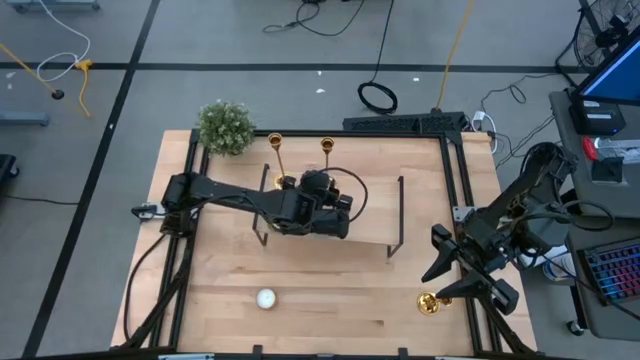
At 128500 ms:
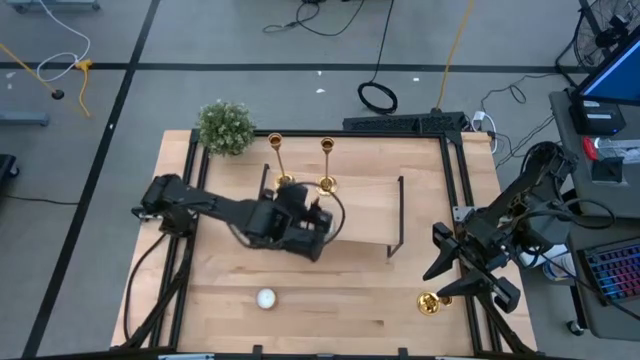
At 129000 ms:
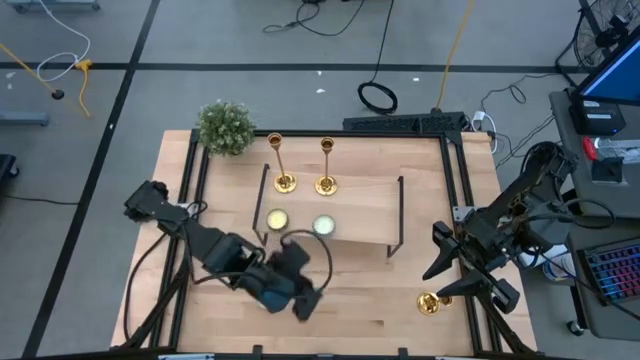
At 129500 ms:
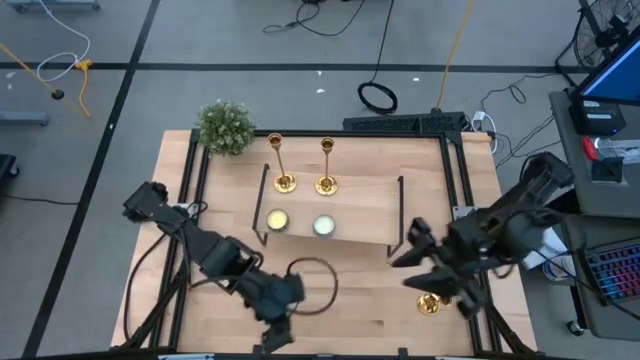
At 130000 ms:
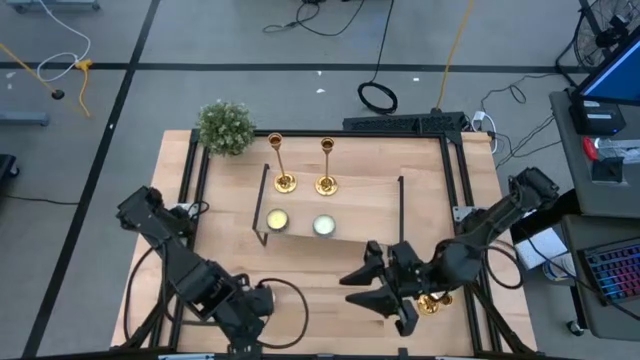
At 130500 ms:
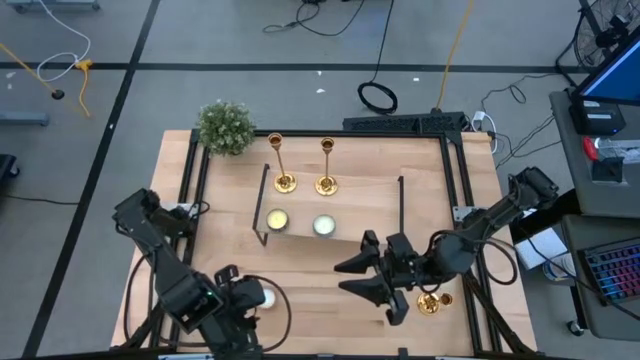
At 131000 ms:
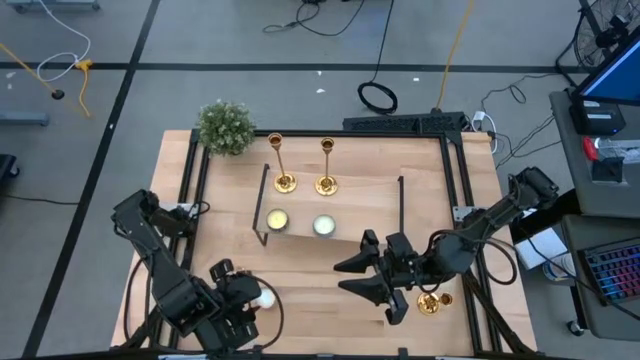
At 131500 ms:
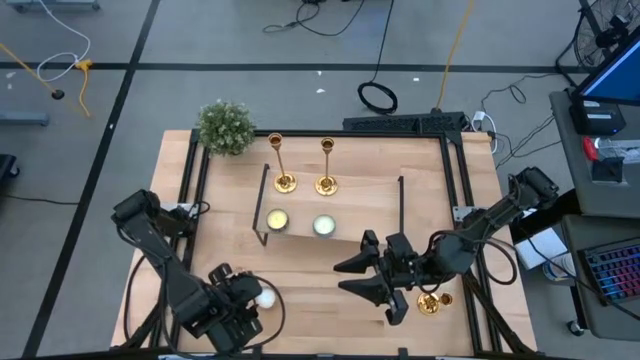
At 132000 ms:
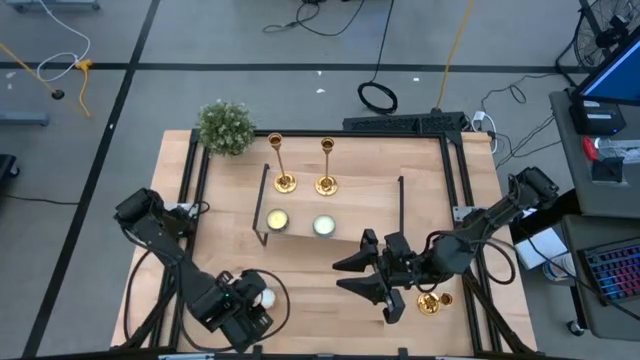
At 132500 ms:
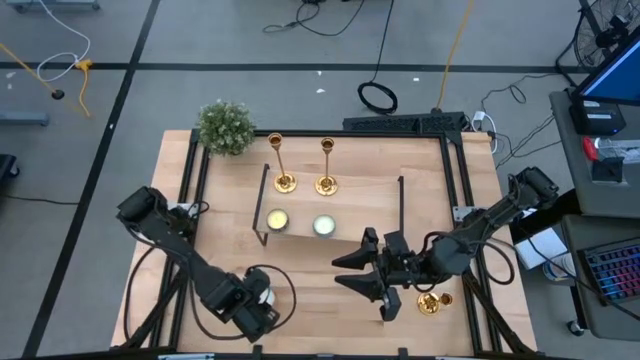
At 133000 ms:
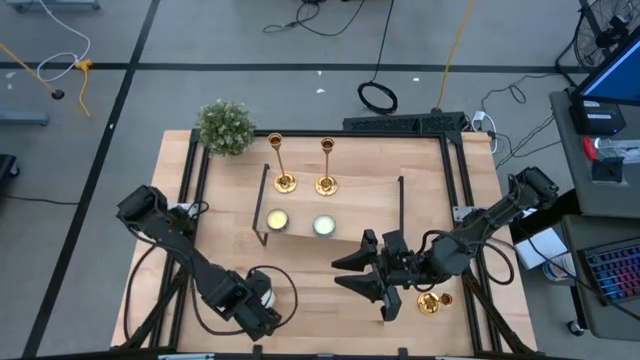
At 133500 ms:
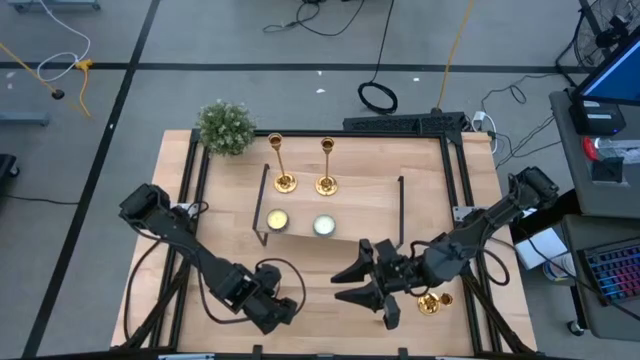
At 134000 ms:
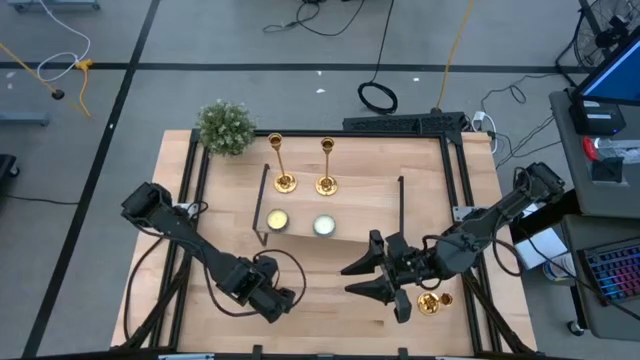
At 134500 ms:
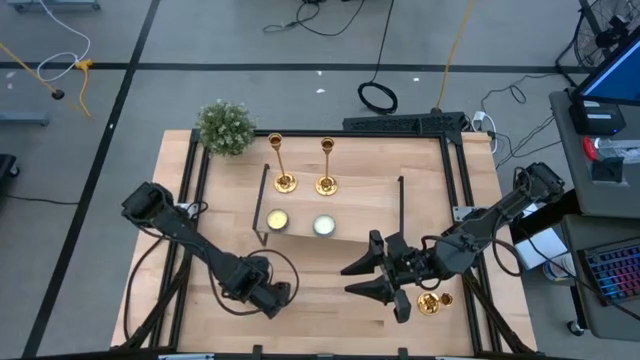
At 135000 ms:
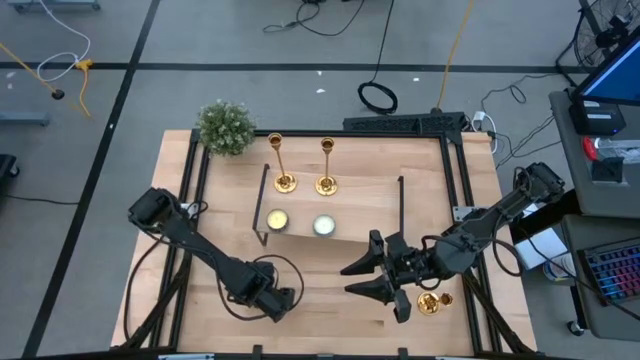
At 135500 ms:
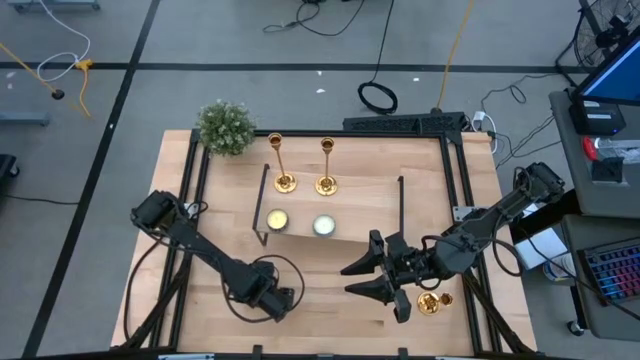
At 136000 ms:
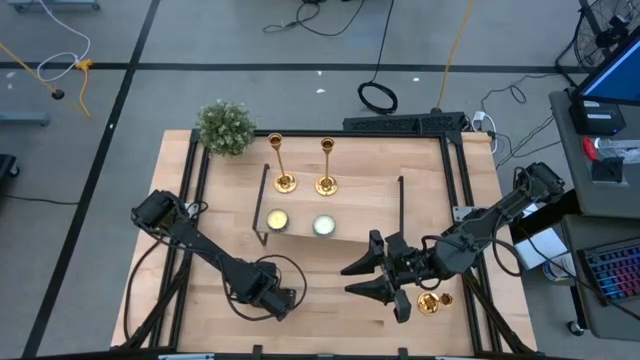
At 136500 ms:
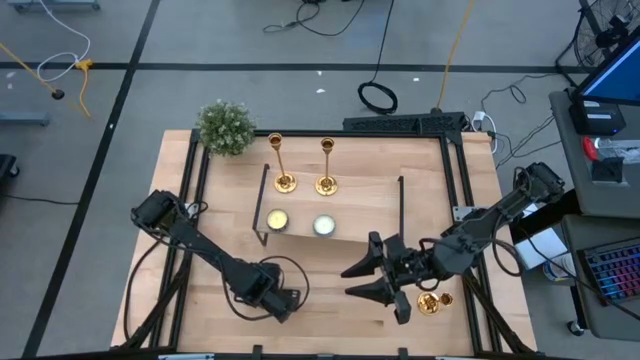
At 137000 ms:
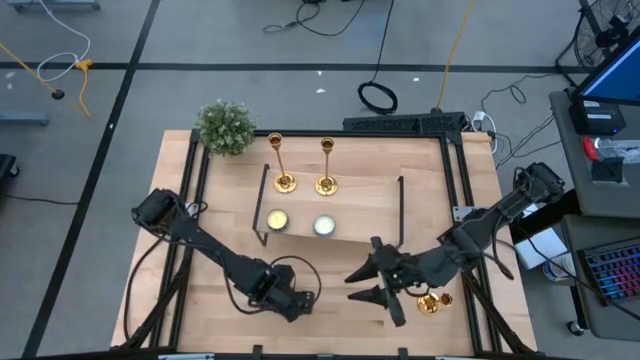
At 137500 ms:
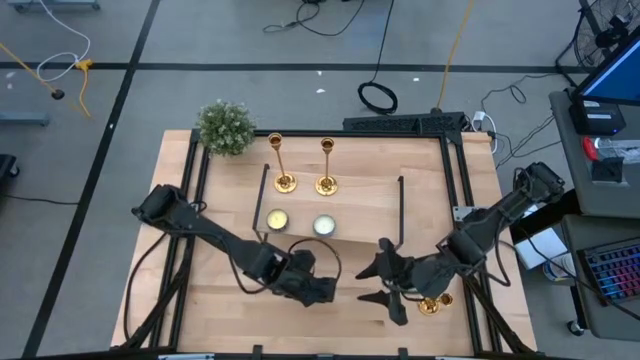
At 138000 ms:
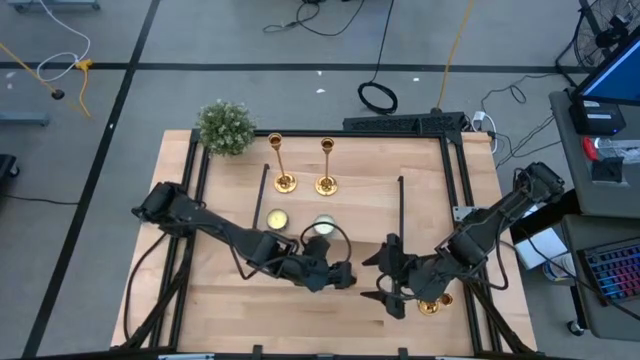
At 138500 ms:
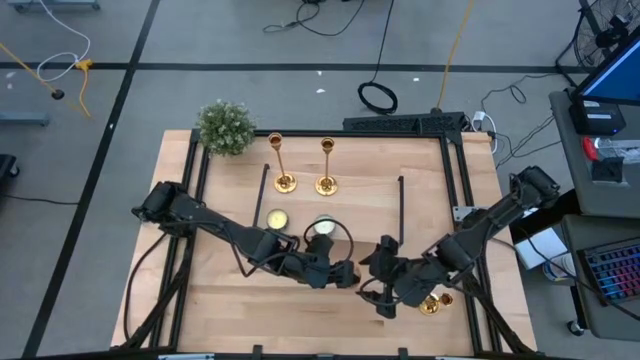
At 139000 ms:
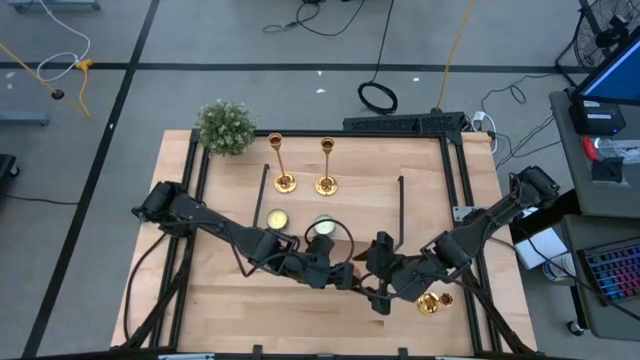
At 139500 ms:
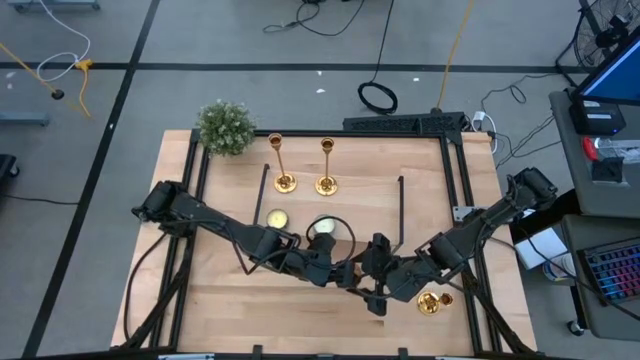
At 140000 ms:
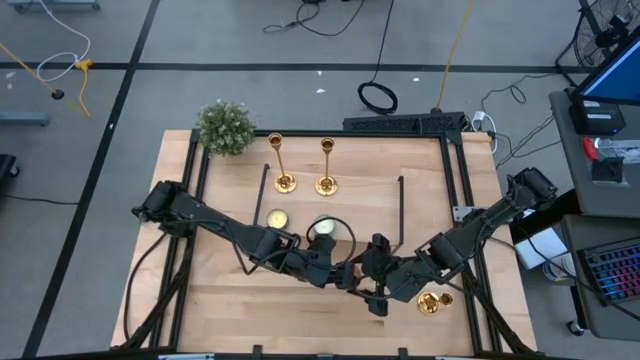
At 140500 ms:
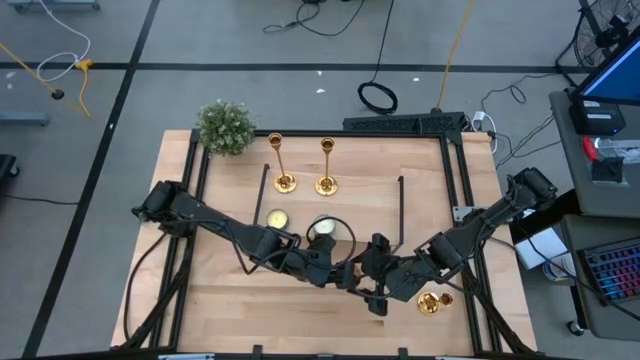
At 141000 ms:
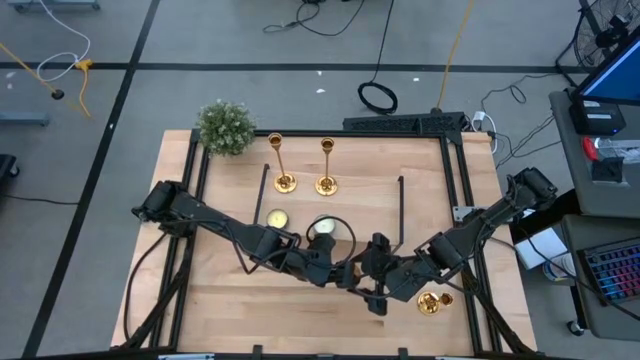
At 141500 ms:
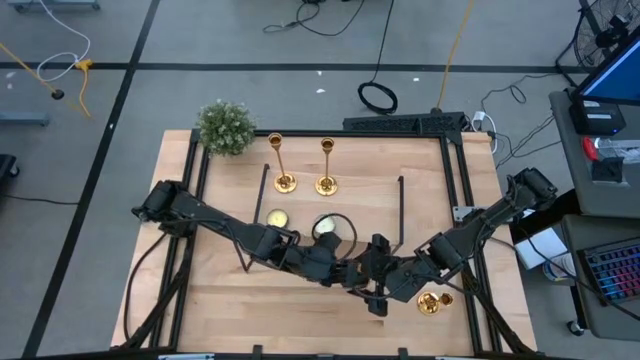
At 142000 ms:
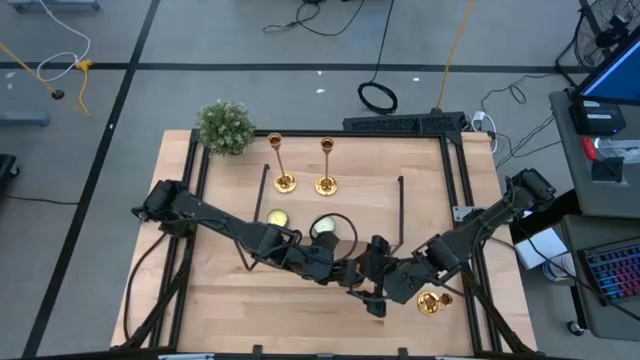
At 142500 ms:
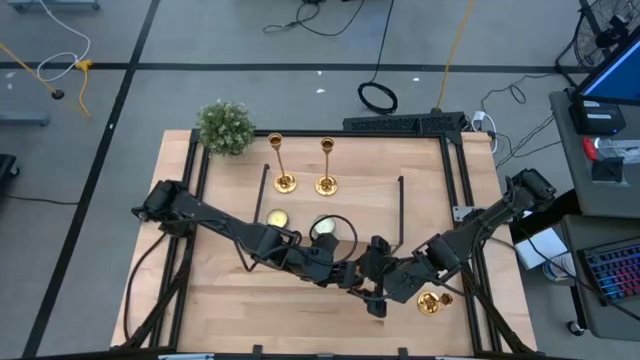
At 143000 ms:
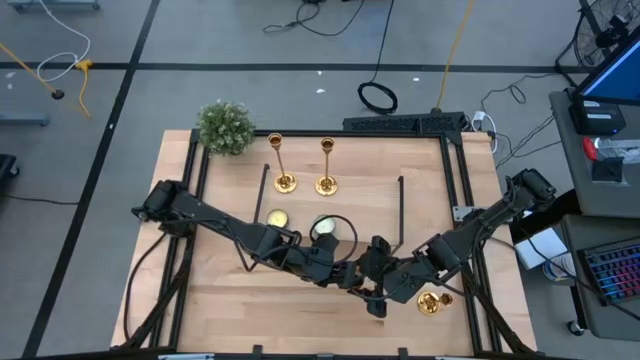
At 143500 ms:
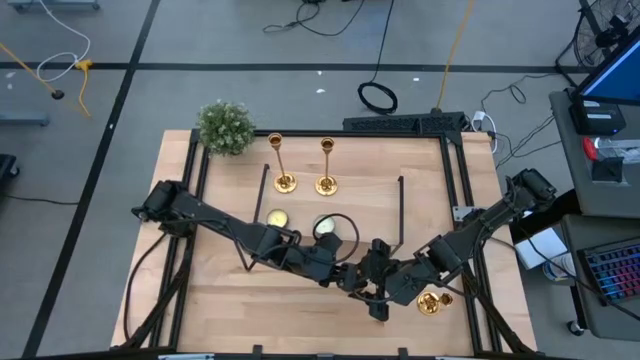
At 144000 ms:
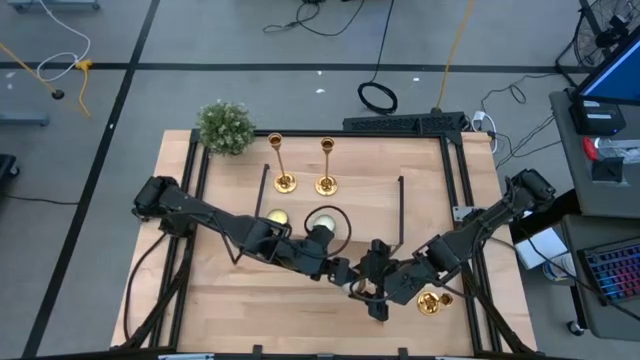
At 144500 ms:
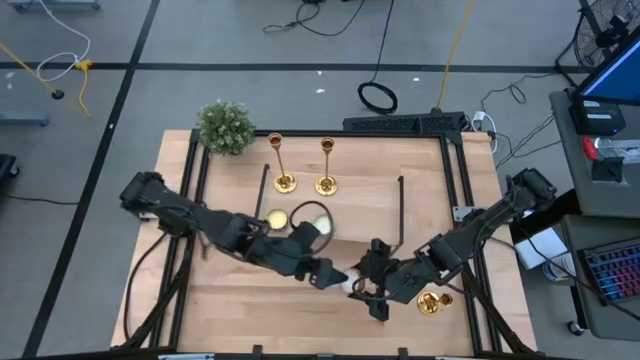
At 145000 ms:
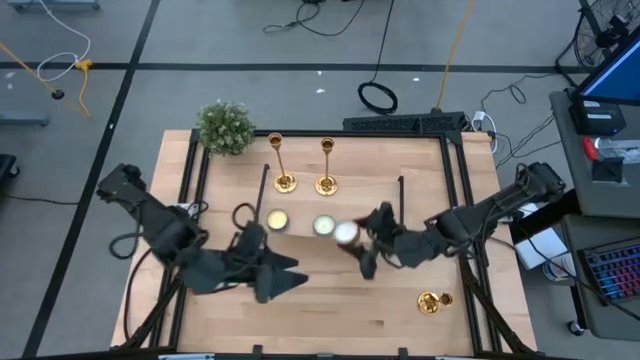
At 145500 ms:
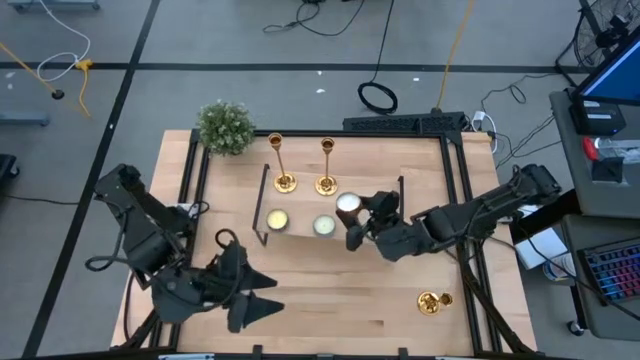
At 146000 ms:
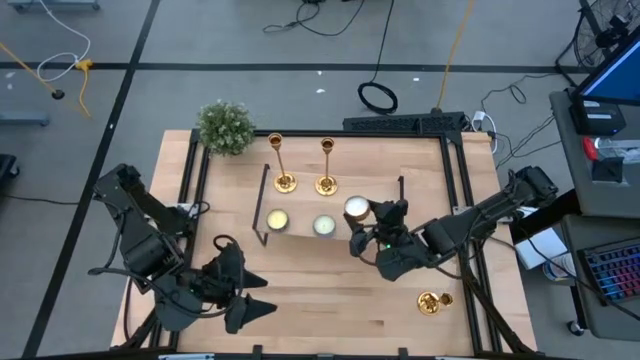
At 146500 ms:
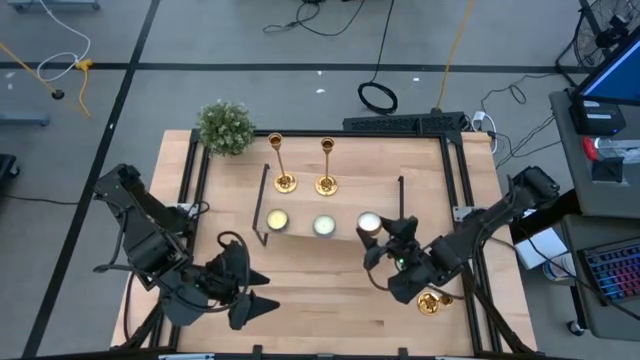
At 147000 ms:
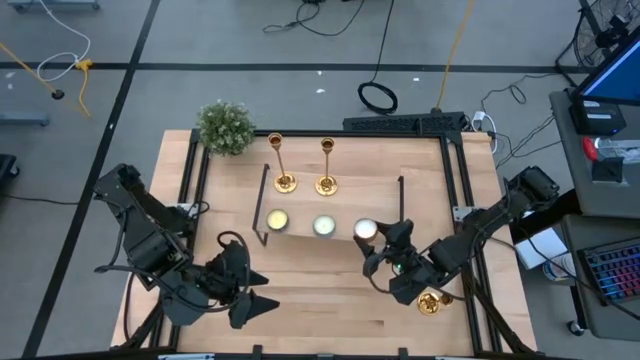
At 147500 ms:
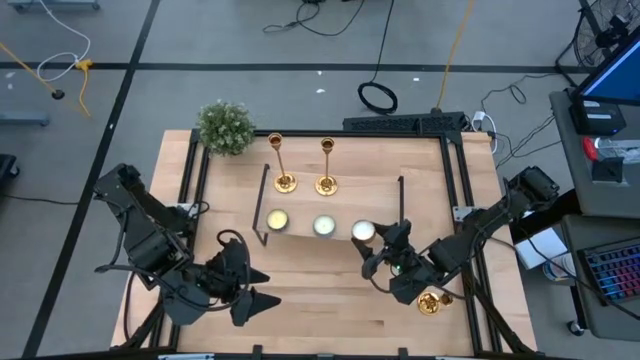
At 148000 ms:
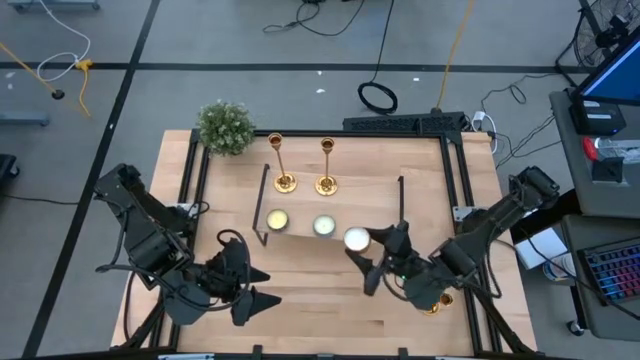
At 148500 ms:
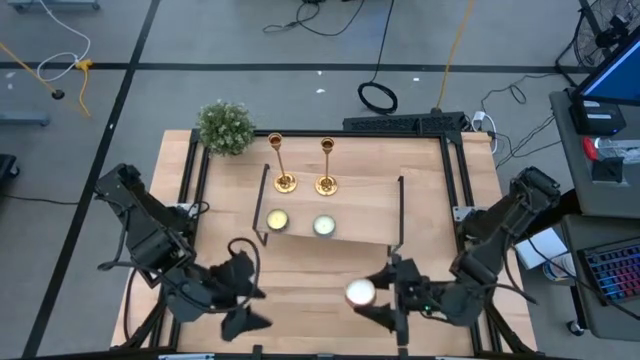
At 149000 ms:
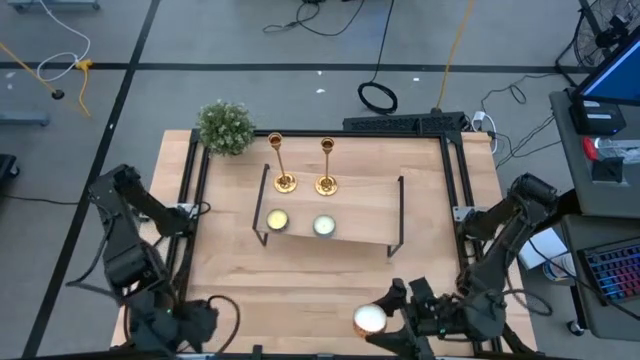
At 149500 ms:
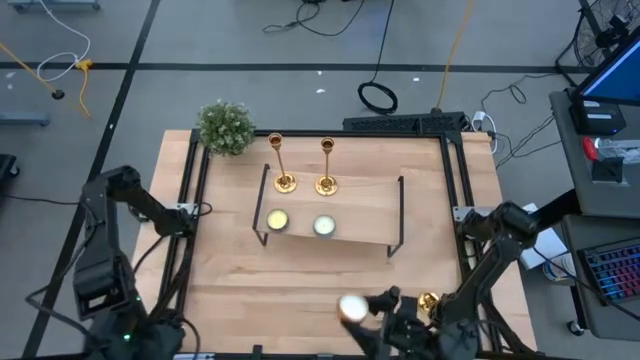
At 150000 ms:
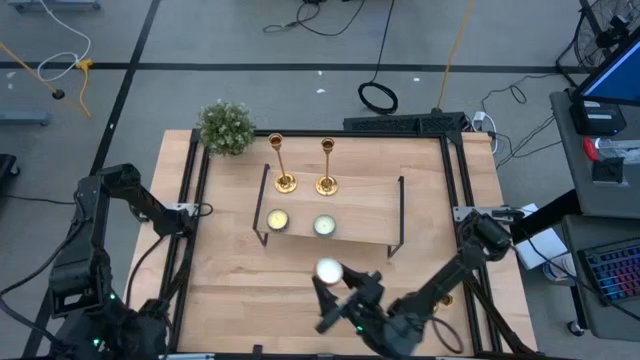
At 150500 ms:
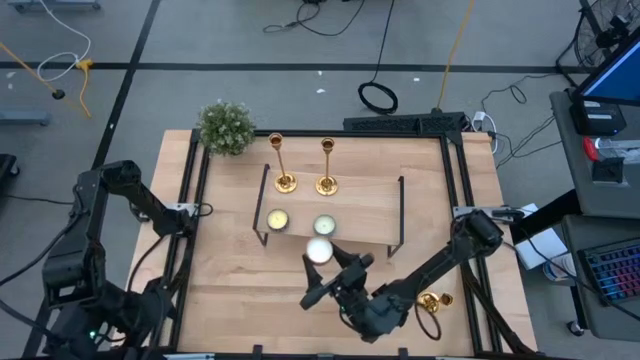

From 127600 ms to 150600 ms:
Task: Pick & Place candle stick holders
Put the yellow scented candle on the shelf
